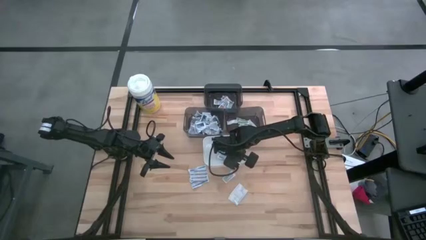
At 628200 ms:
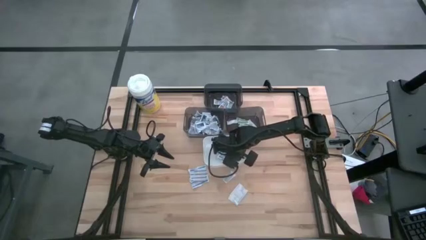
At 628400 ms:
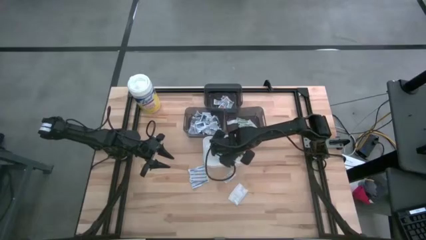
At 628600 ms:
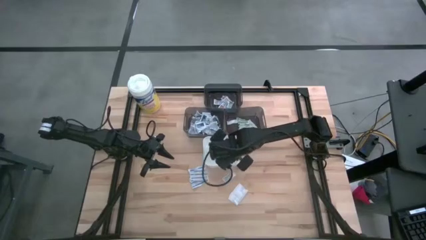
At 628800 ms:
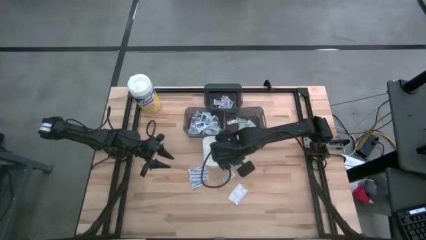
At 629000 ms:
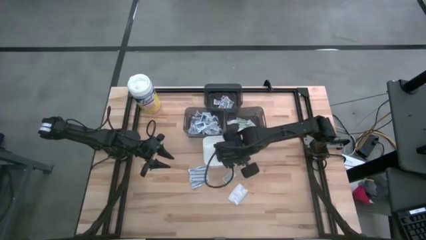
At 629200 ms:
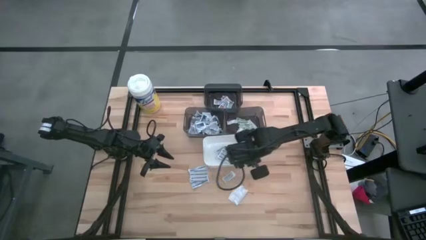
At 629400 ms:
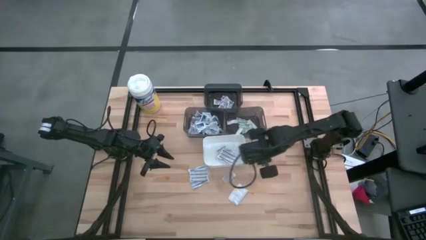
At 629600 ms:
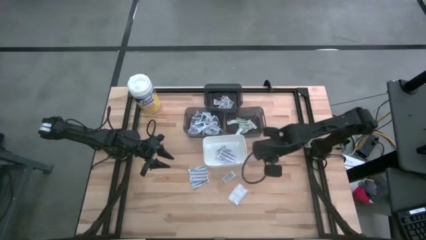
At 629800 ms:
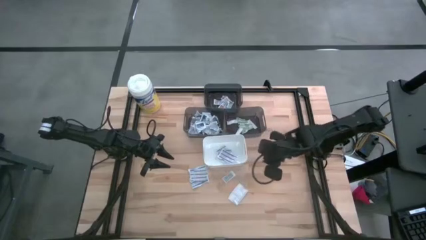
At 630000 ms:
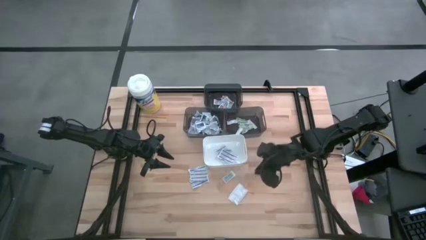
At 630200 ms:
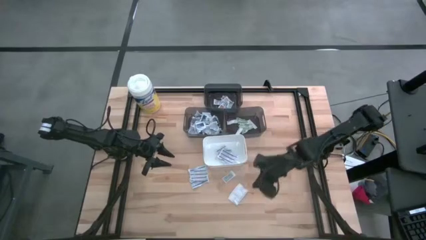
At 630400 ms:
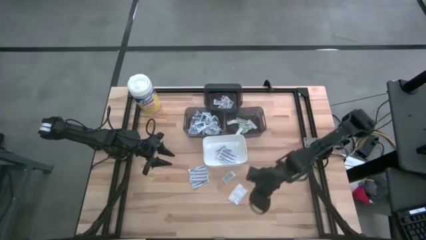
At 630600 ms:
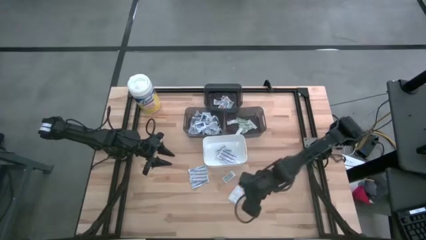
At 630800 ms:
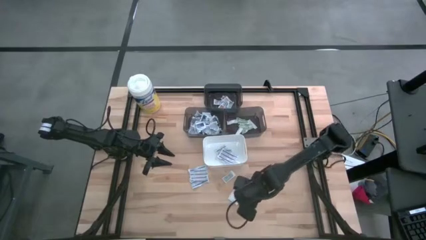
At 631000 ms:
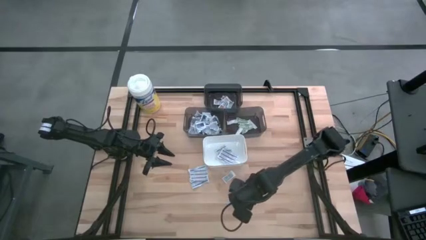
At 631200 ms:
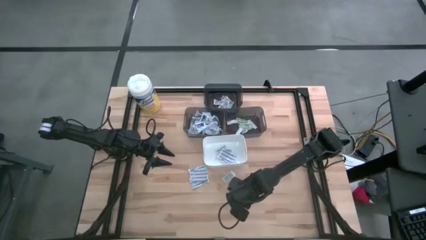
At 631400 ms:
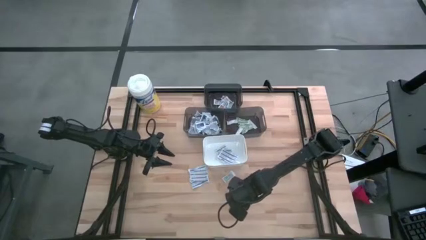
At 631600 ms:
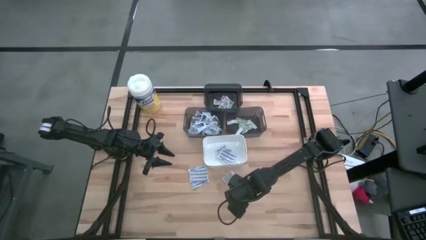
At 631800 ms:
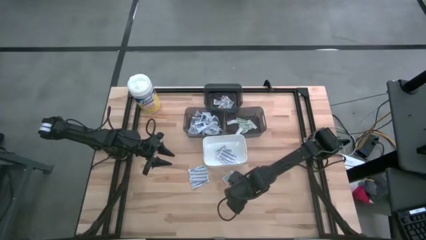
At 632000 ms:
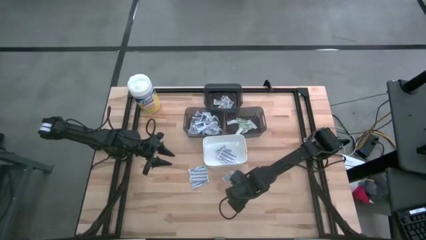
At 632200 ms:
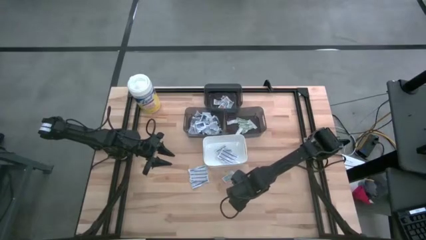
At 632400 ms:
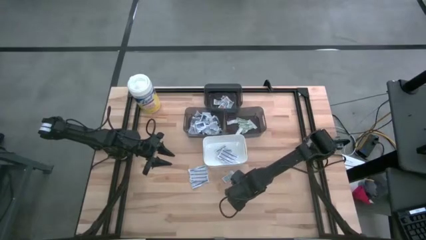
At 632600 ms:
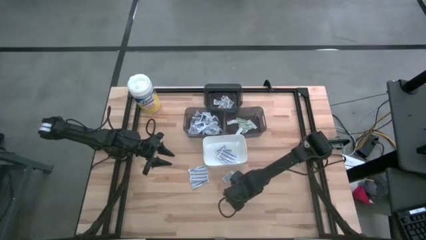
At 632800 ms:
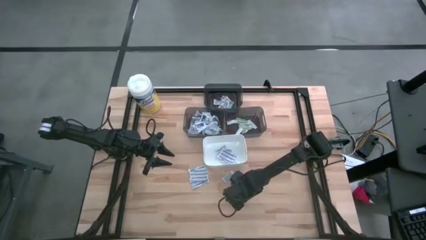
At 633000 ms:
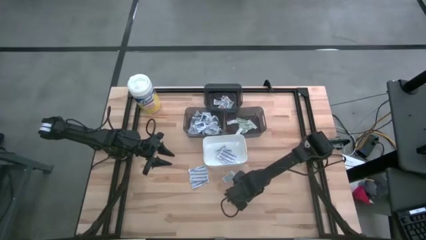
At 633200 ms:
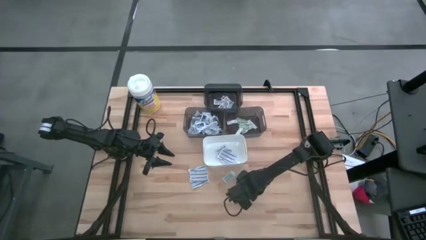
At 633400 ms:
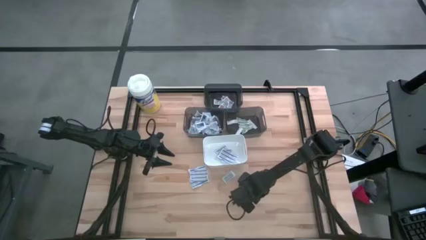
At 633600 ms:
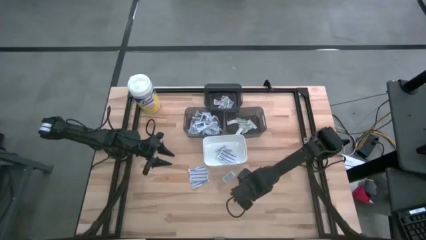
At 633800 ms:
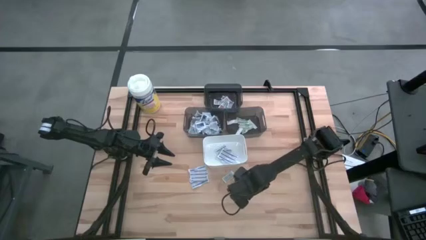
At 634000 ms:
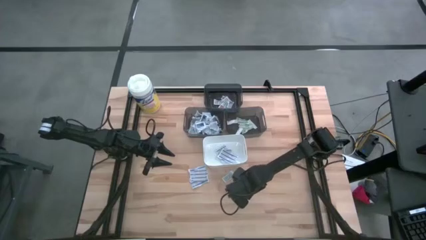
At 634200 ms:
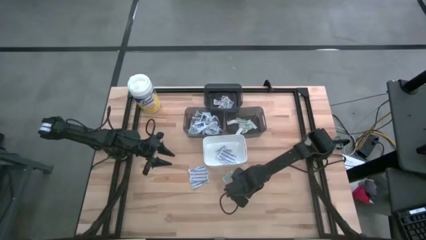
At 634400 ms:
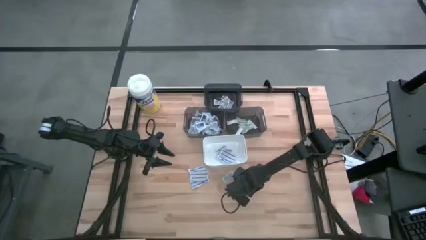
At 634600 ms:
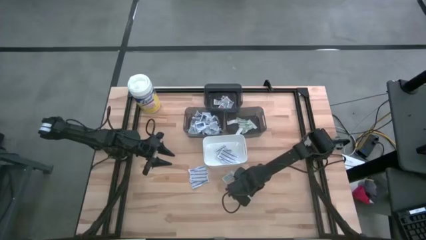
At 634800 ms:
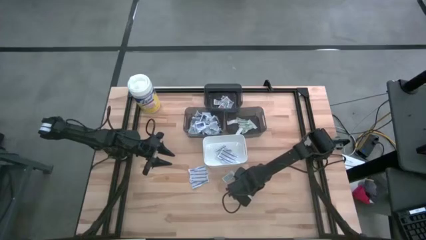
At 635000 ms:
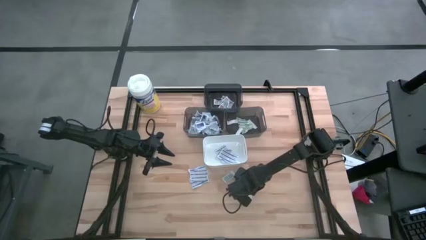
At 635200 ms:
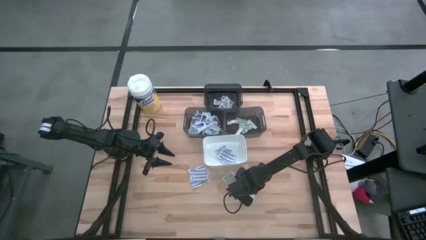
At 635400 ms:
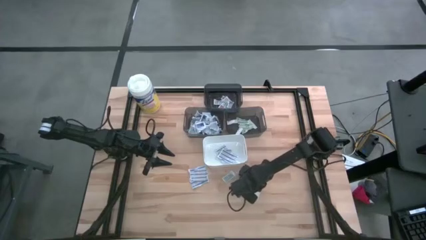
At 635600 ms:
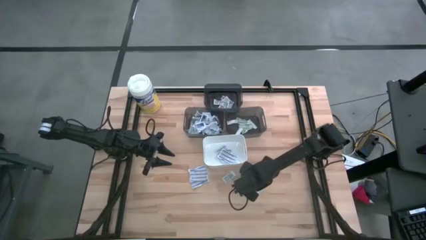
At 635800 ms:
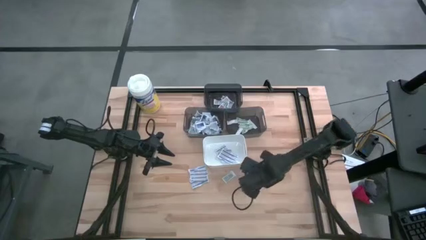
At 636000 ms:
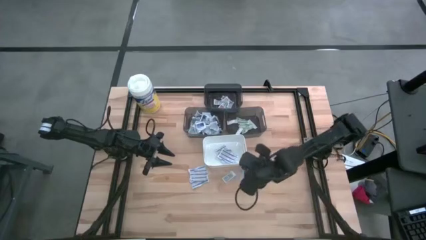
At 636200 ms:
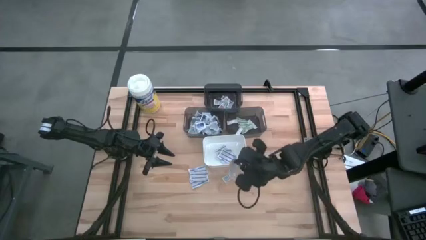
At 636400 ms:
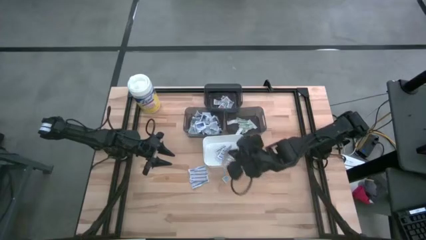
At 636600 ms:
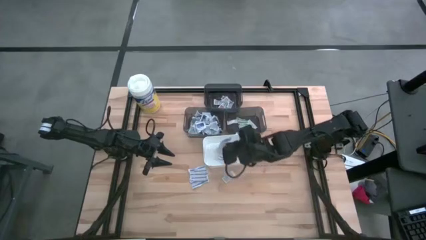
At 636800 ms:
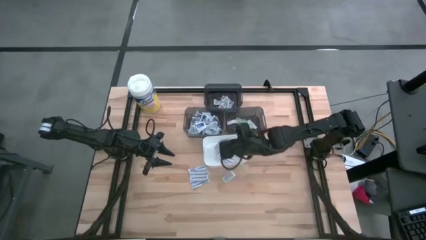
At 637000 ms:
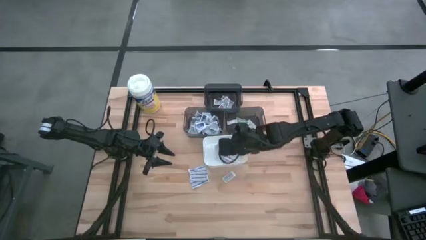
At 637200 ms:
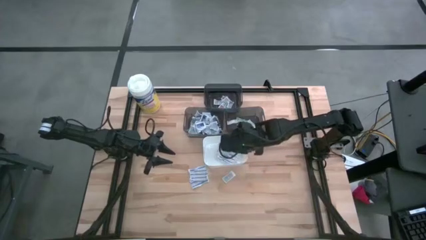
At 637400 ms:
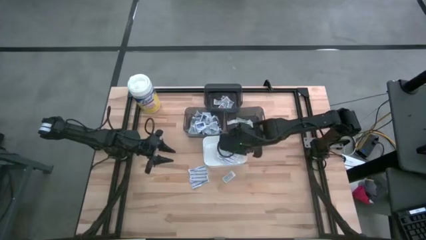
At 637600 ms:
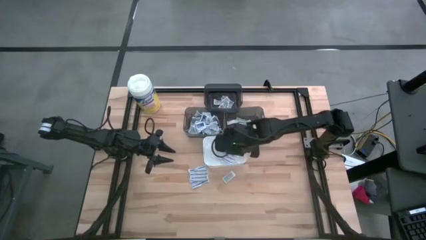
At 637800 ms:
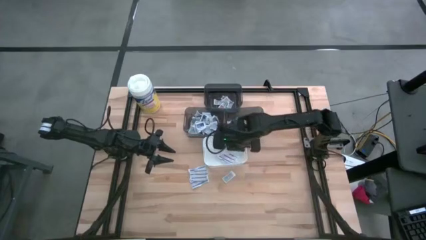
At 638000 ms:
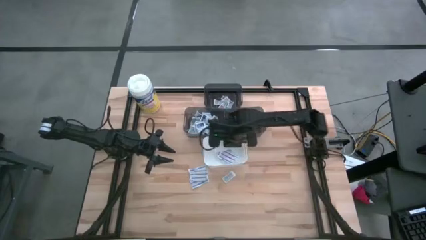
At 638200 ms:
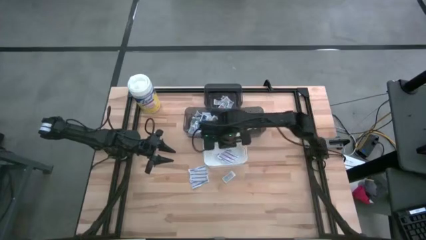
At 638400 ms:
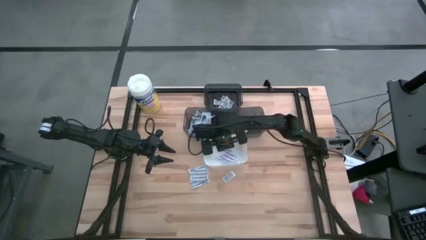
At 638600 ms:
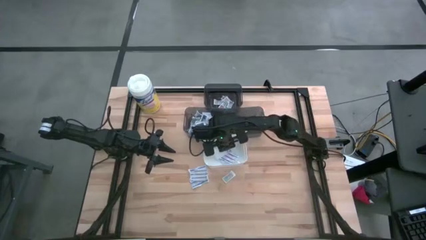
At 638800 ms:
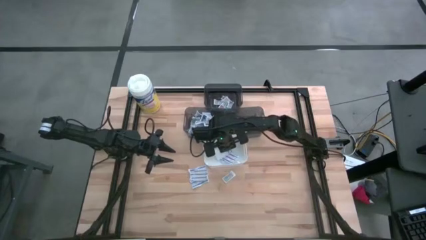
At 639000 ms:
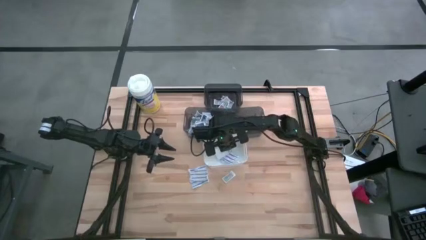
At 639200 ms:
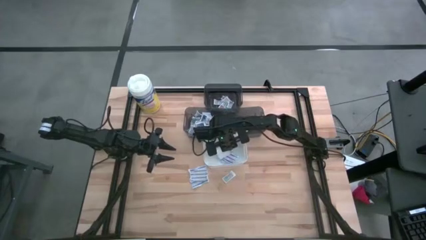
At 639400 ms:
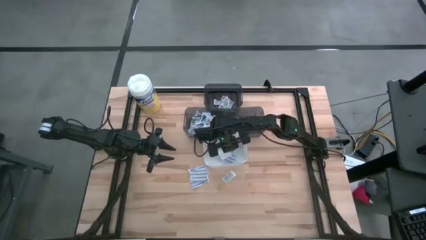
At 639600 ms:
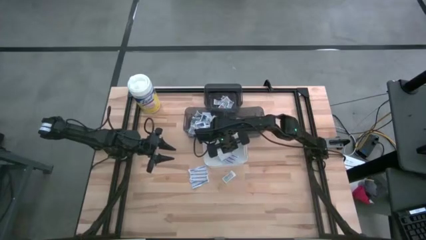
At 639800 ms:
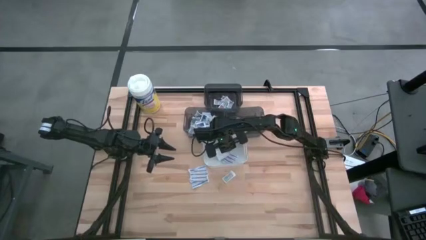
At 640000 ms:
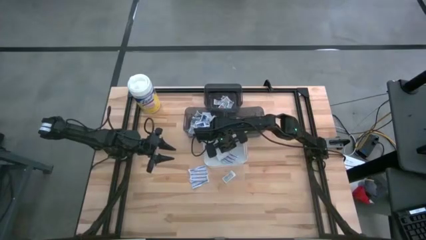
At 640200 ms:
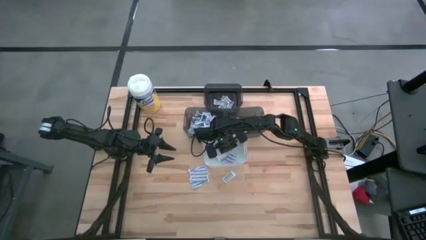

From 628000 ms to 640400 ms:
Task: Pick & Place First Aid Supplies
Put the blue bandage into the white bin

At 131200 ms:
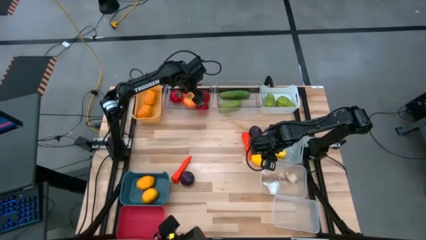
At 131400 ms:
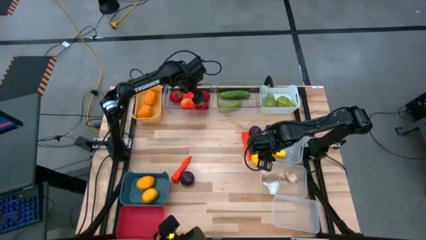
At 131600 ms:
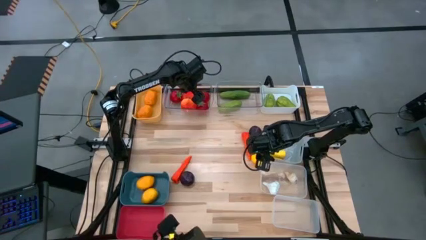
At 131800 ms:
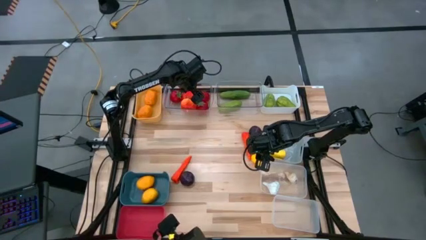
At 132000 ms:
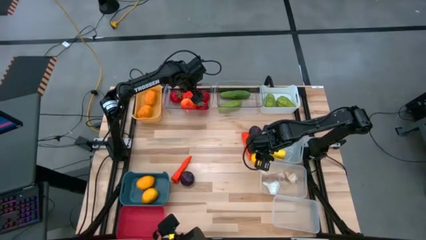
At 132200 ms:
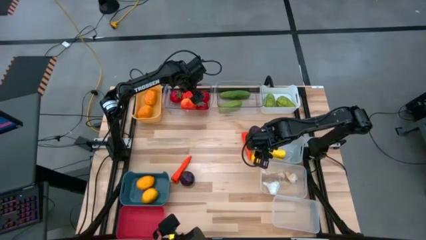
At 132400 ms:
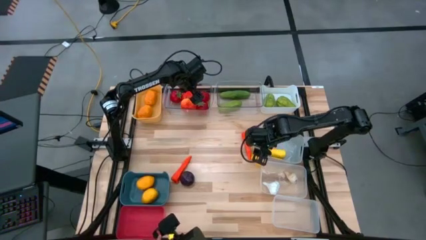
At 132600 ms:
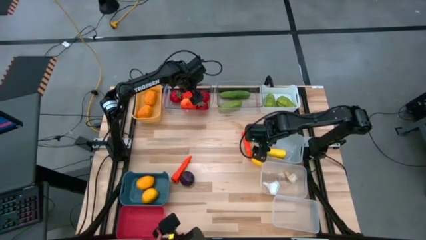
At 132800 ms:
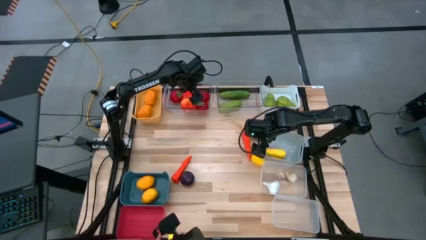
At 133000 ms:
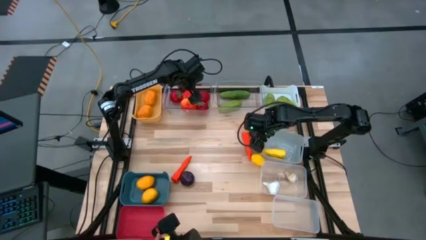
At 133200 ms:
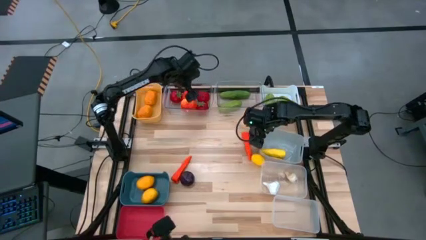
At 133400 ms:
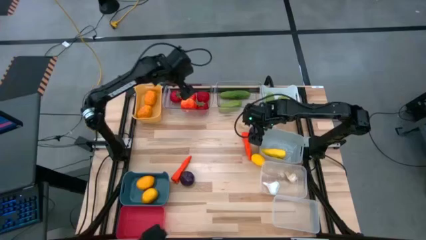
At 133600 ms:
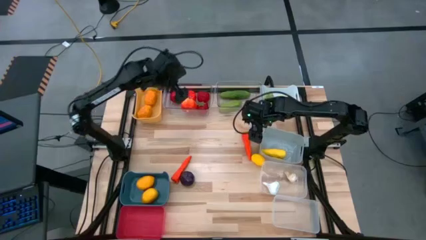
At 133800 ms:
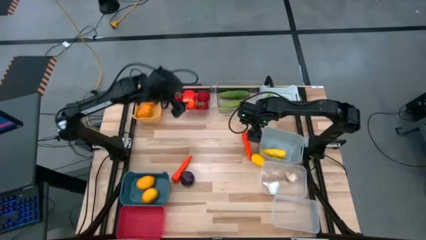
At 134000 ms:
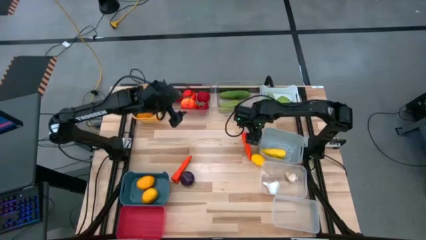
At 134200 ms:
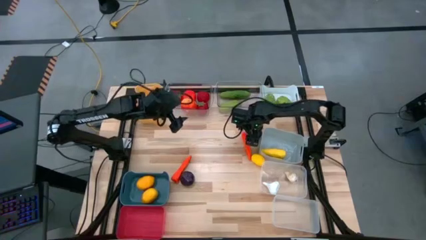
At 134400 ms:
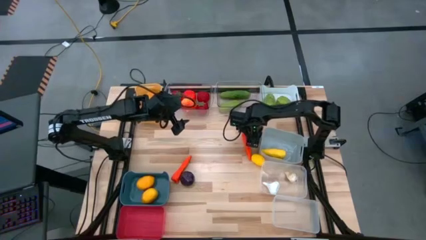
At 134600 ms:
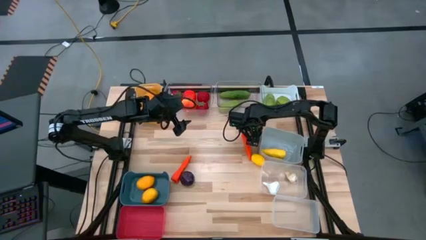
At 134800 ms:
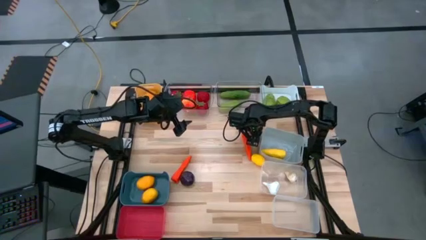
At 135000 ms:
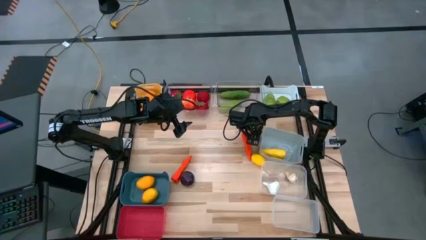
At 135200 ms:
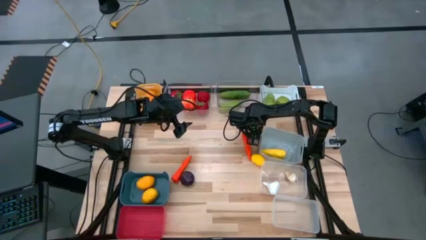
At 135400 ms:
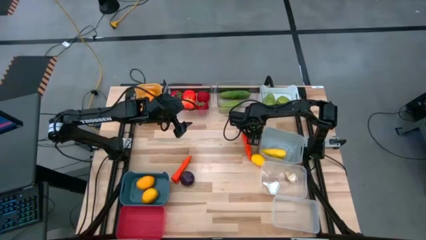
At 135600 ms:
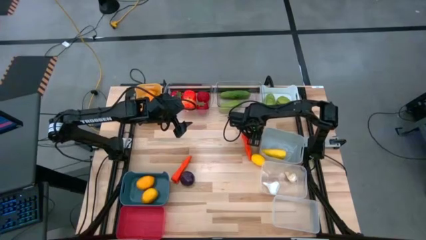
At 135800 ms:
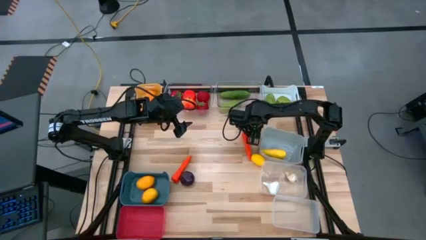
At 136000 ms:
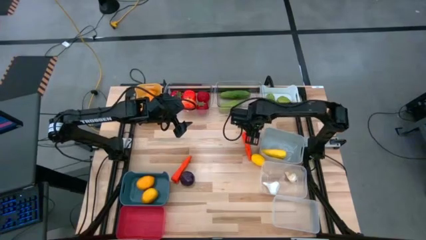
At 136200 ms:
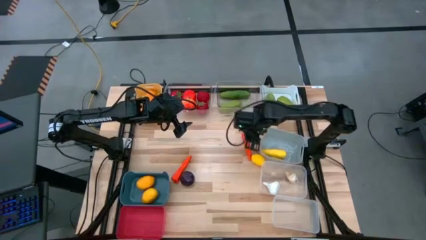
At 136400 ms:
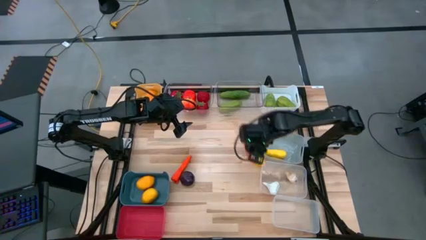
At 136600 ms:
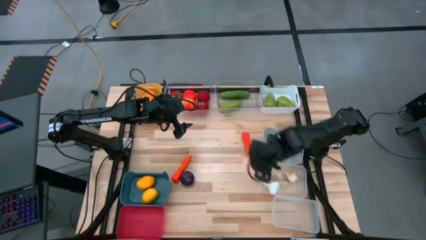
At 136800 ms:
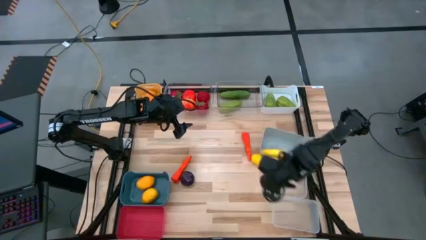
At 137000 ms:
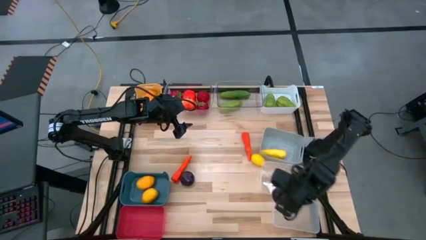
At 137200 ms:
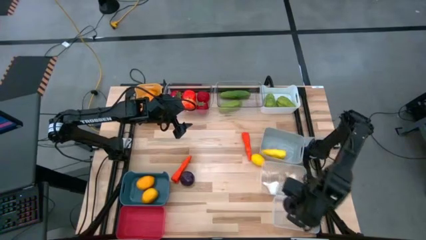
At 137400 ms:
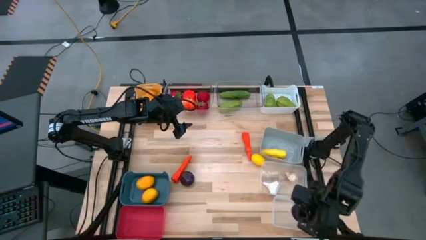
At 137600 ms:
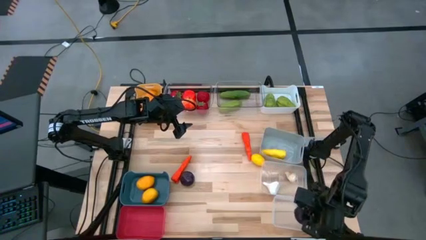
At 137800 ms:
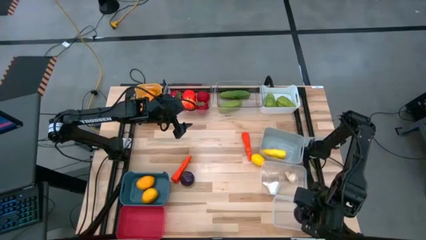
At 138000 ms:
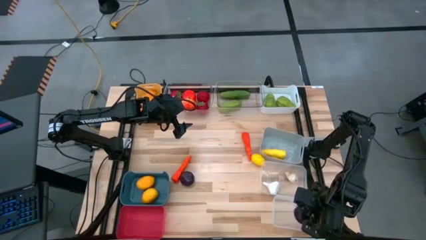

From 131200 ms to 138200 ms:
Task: Sort produce into baskets
Put the purple plum into the bottom white transparent bin
